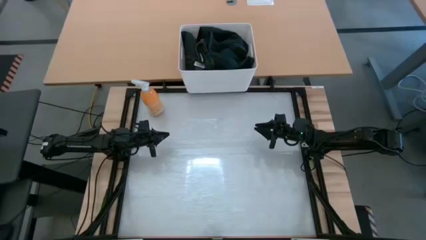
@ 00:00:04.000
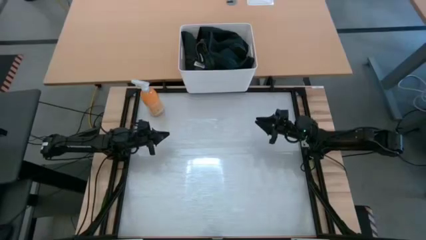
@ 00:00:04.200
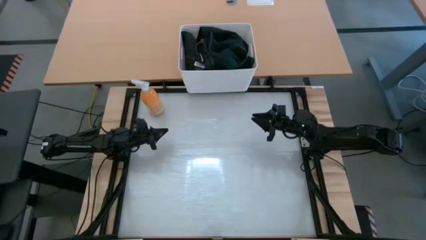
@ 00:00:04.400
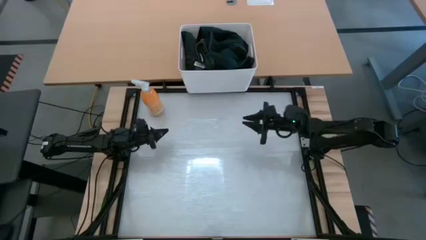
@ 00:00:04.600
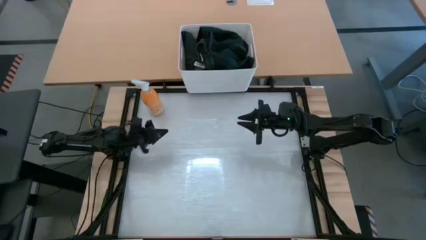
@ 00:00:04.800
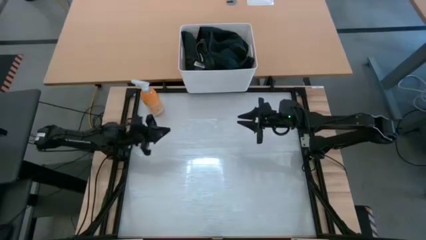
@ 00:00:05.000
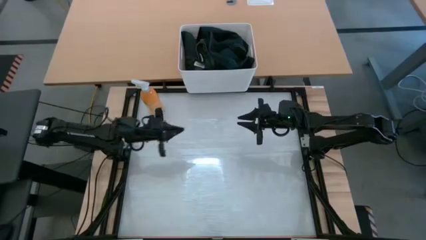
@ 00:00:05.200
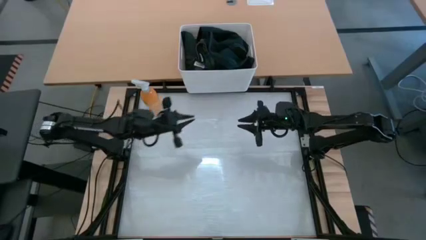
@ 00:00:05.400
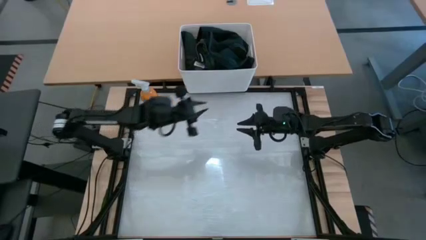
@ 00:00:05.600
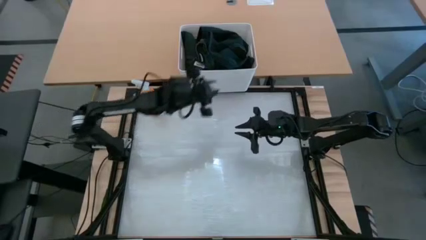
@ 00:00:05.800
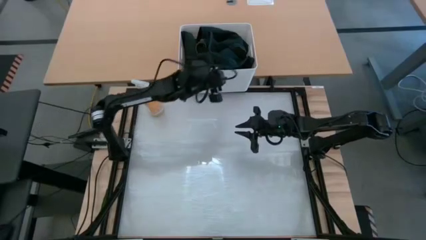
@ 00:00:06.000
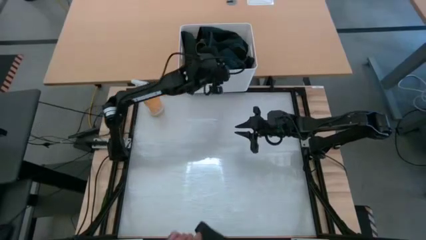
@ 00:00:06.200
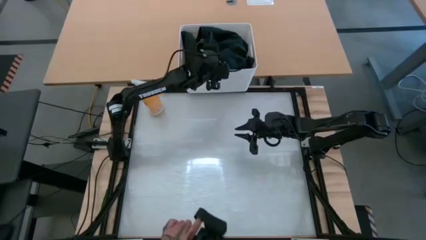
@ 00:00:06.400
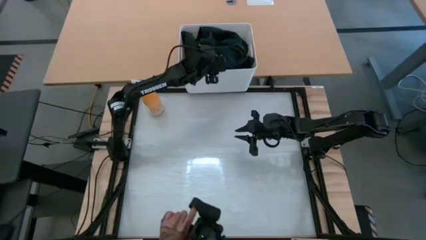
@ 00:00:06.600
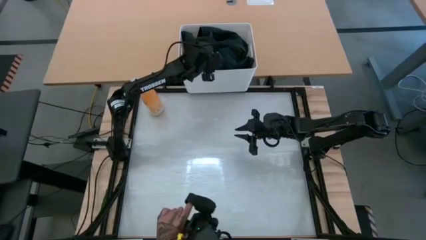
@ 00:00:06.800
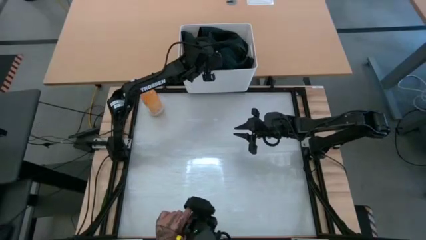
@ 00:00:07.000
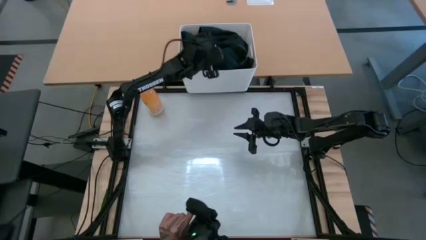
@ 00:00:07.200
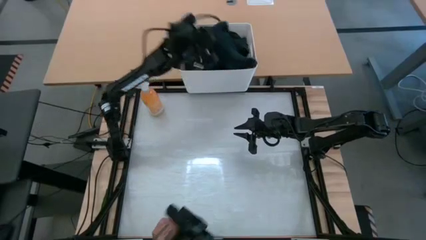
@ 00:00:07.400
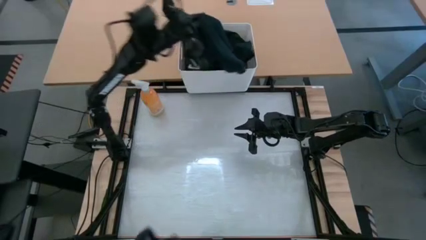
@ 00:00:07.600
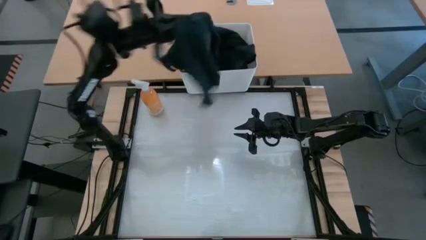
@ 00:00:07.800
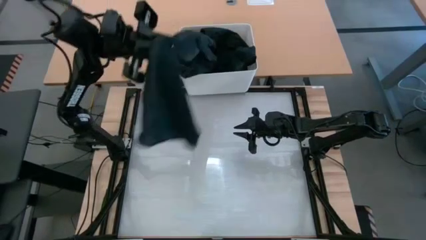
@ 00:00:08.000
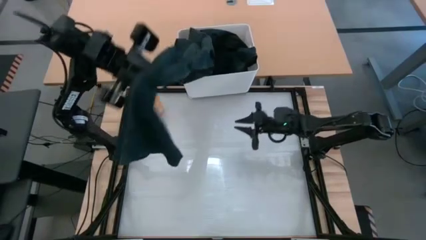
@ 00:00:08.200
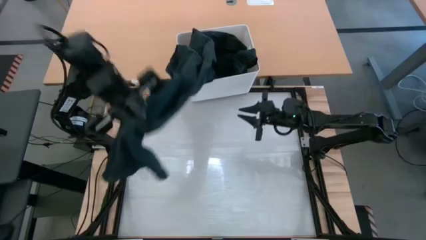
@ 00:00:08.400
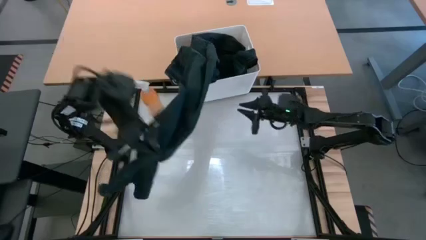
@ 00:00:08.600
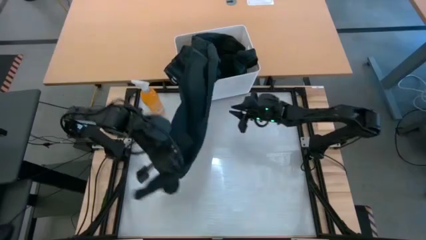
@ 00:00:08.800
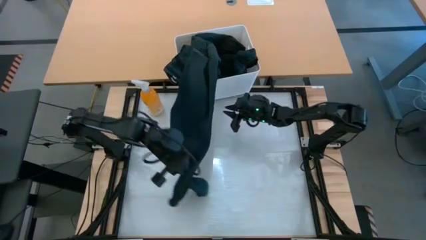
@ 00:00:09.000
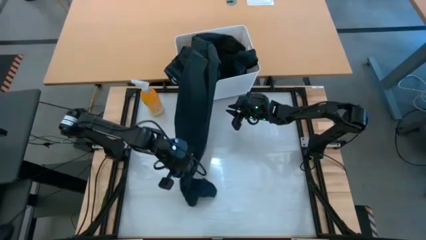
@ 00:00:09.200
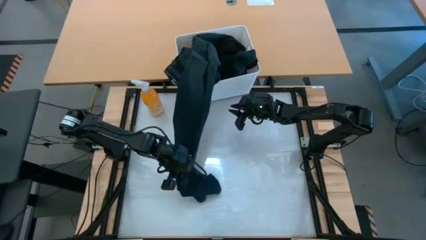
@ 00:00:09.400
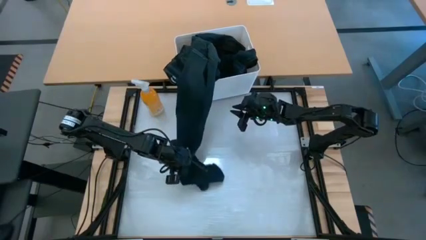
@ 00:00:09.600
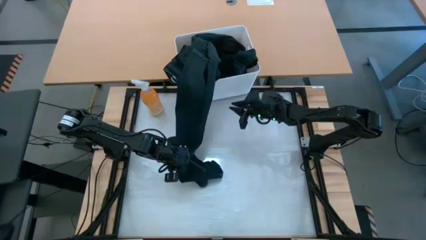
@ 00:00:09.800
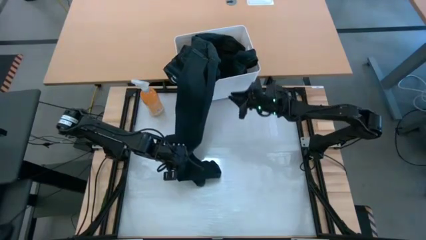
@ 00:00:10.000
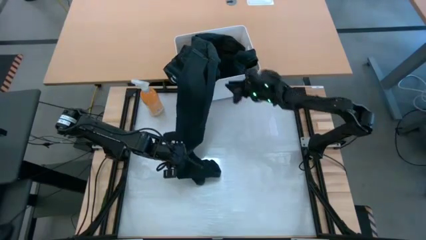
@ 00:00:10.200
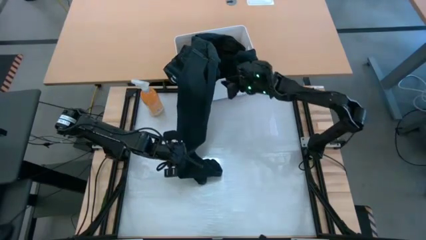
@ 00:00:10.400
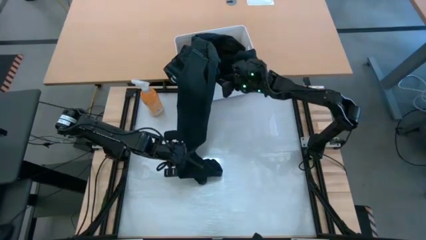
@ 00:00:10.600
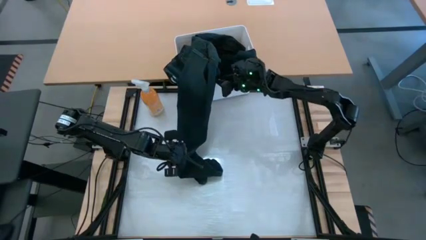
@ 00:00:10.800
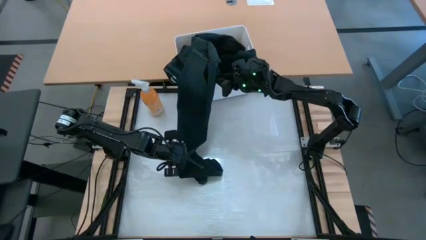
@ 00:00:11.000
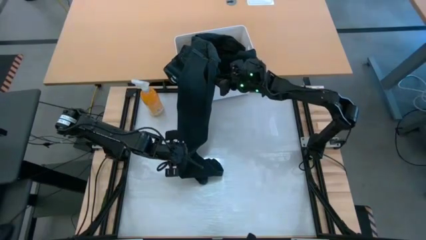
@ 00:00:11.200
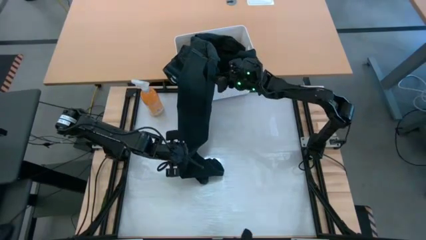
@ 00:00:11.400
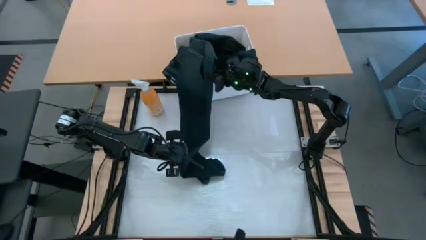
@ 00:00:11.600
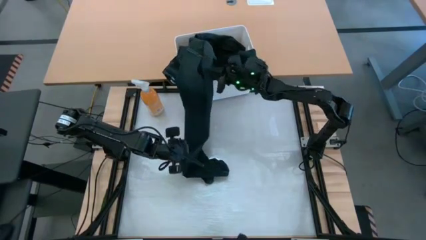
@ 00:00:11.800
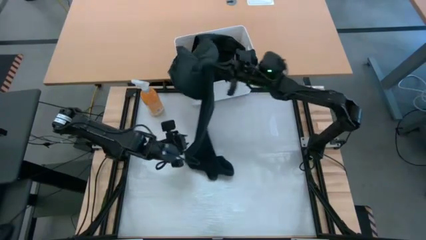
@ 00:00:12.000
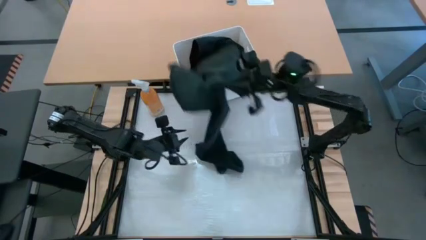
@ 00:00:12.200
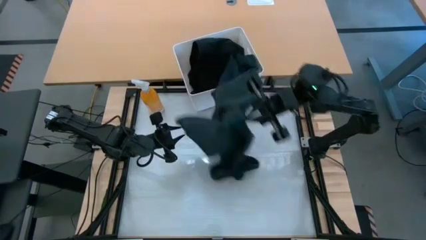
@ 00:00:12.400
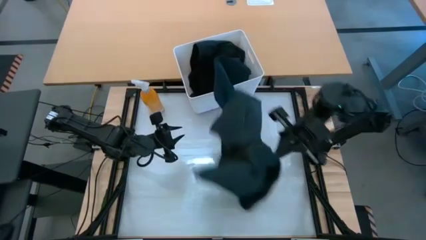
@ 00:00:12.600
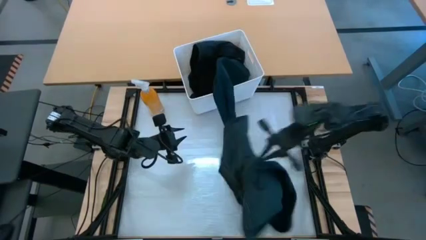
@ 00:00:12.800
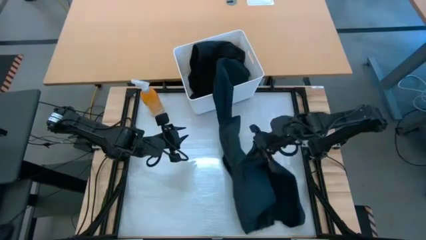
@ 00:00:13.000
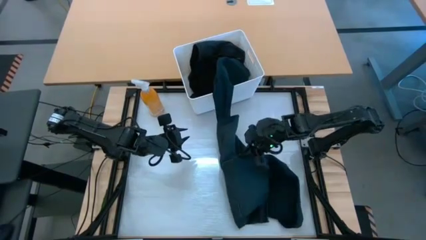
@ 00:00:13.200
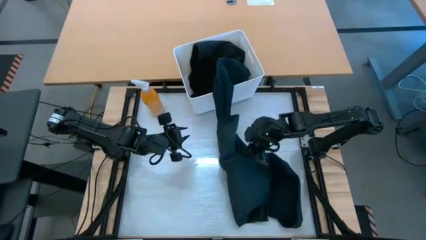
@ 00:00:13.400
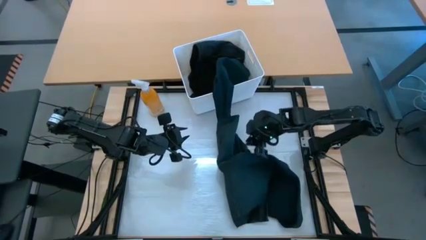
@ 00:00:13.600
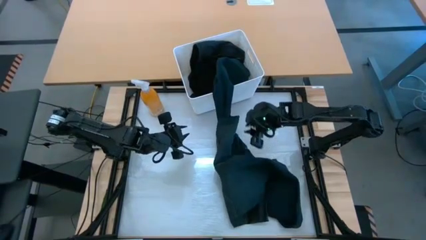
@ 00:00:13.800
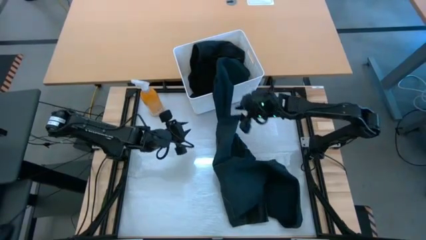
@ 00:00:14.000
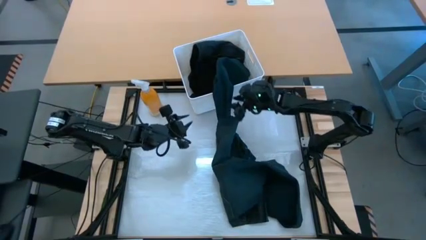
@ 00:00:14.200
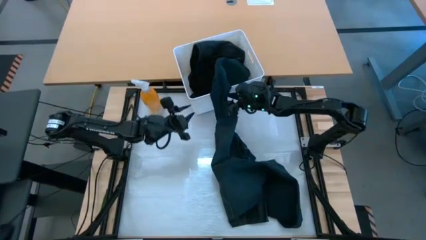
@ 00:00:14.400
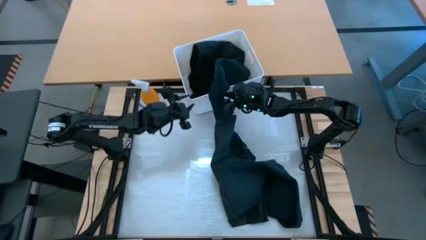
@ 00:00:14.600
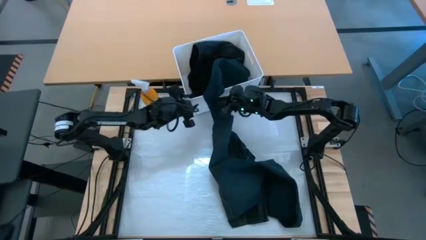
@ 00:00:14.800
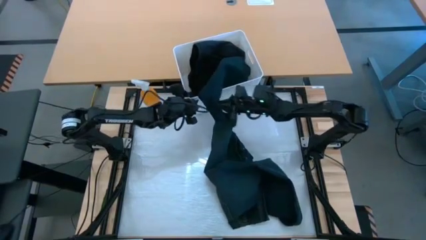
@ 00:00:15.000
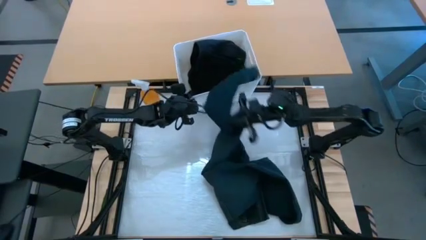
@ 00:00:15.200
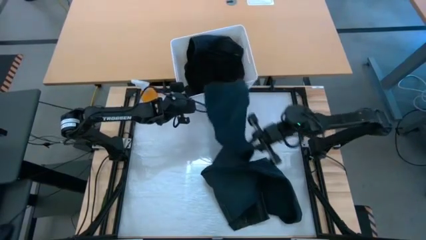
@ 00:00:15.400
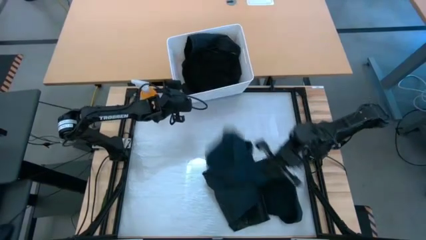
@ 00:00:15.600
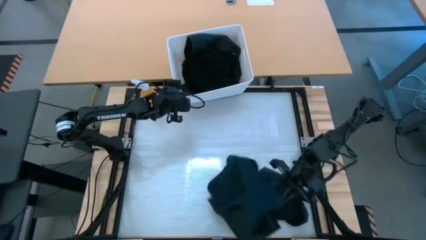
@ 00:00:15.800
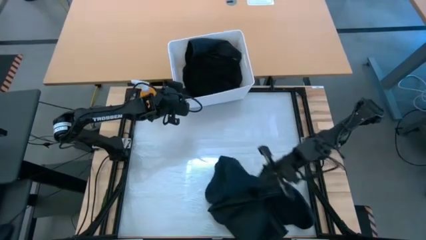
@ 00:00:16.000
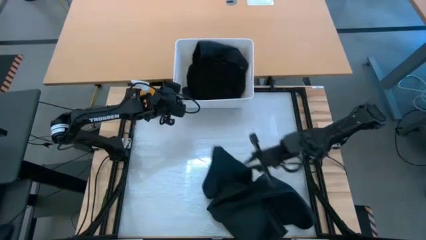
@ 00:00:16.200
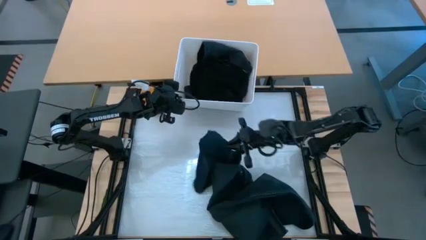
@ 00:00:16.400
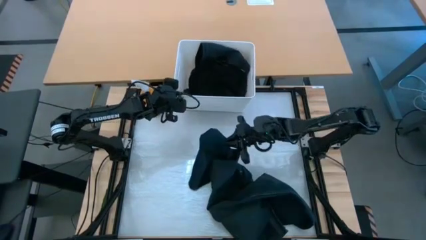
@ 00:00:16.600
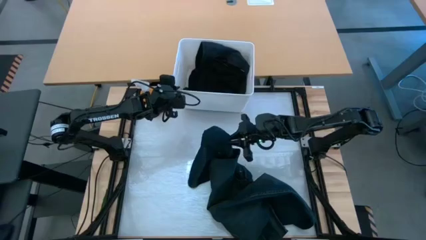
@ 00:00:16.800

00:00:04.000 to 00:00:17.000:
Task: Fold laundry
Remove the blue long pants from the white bin
